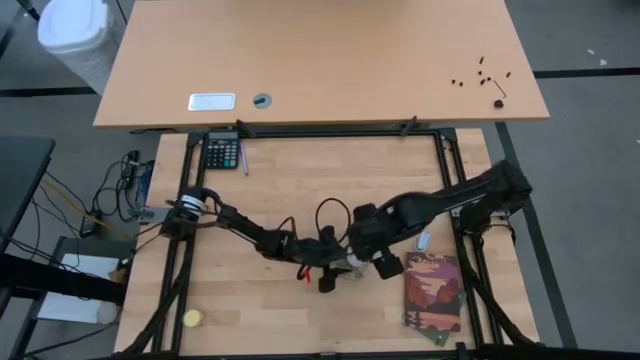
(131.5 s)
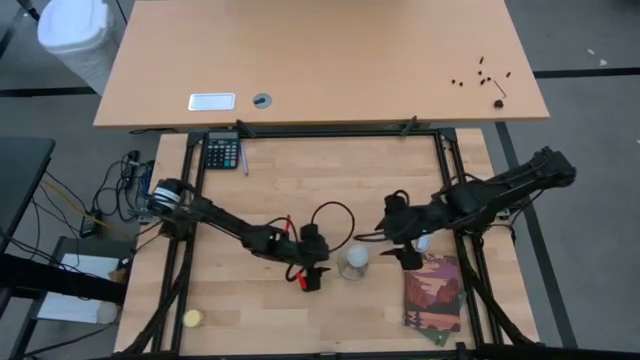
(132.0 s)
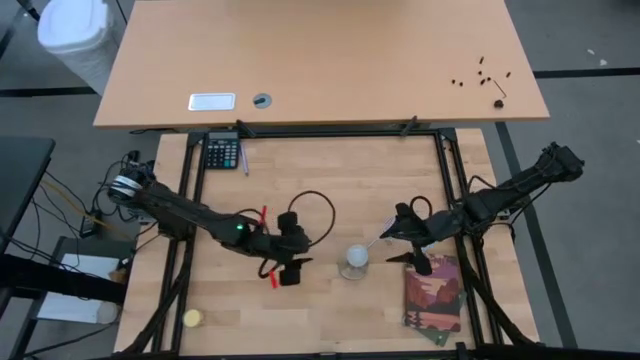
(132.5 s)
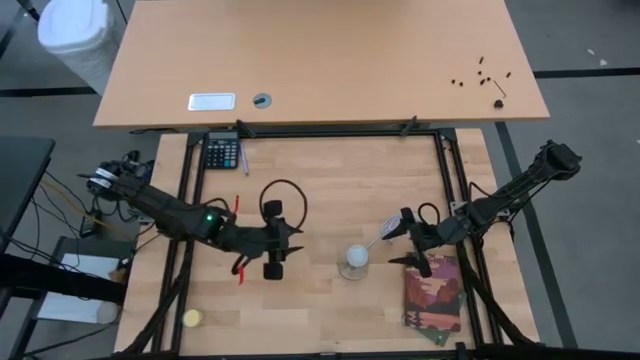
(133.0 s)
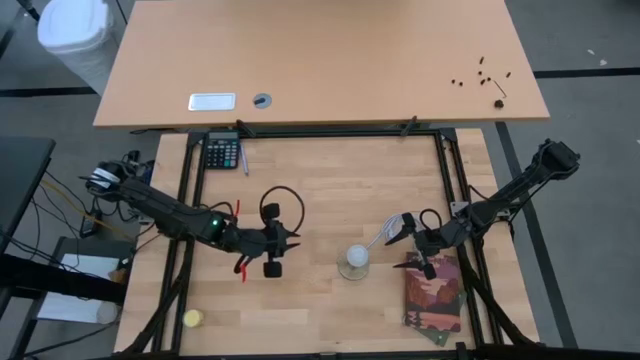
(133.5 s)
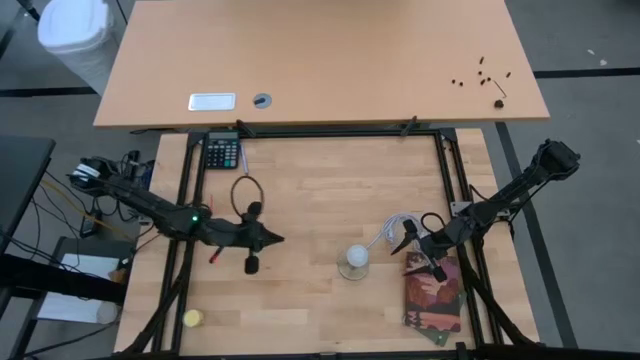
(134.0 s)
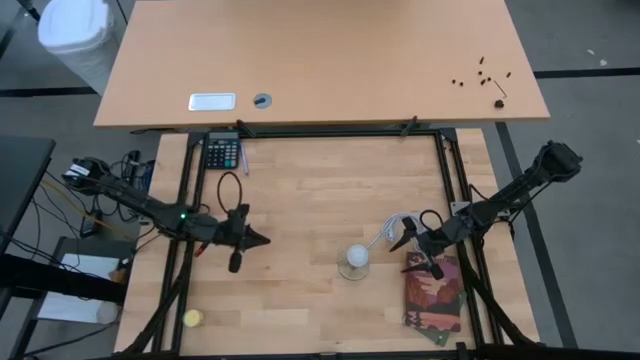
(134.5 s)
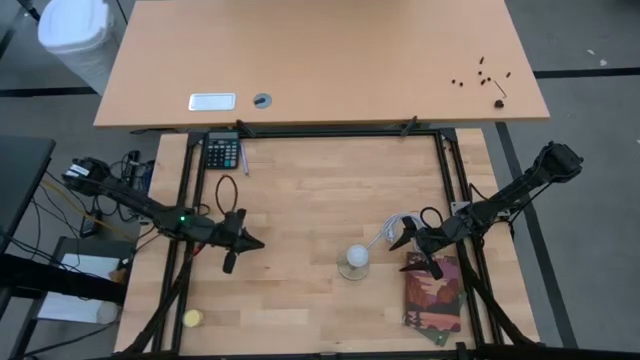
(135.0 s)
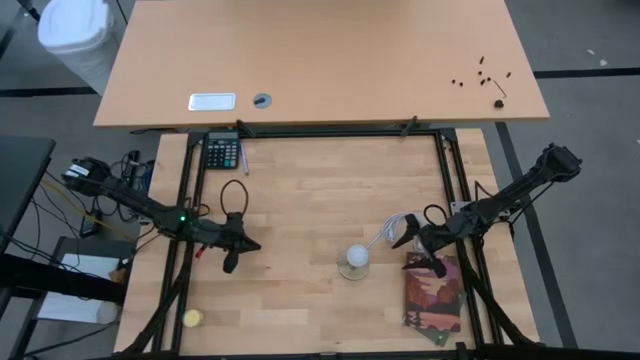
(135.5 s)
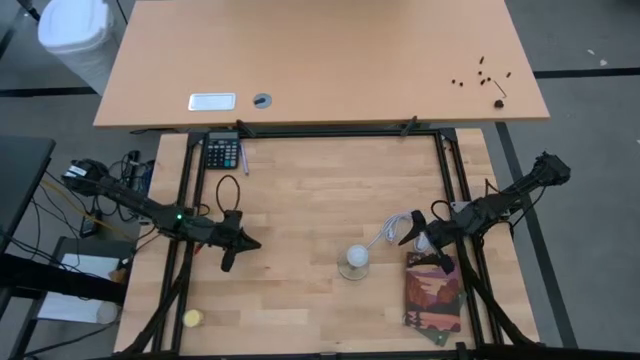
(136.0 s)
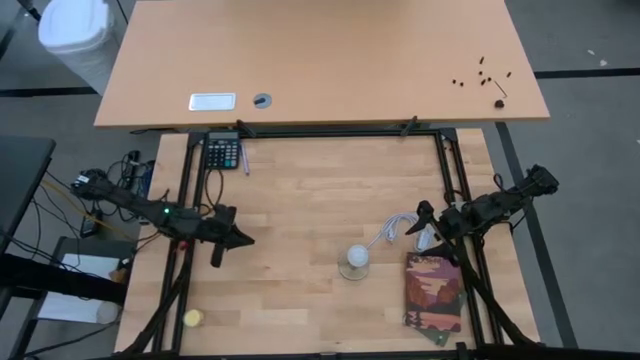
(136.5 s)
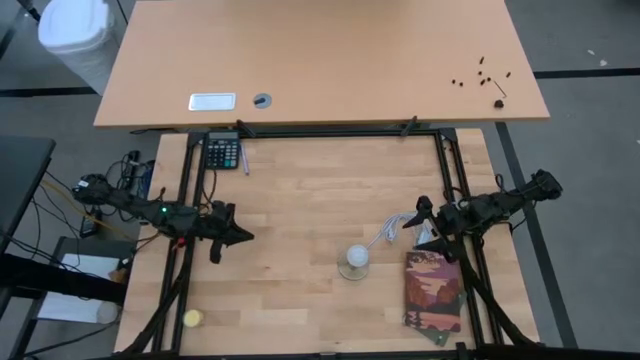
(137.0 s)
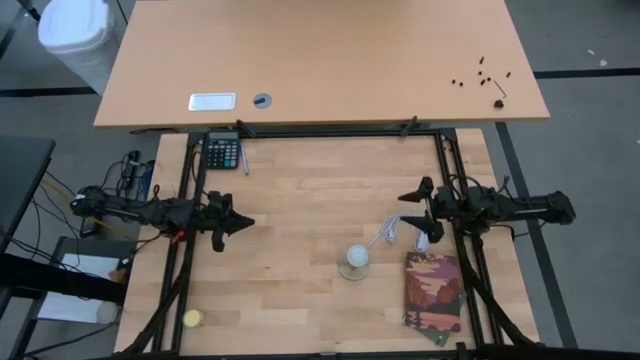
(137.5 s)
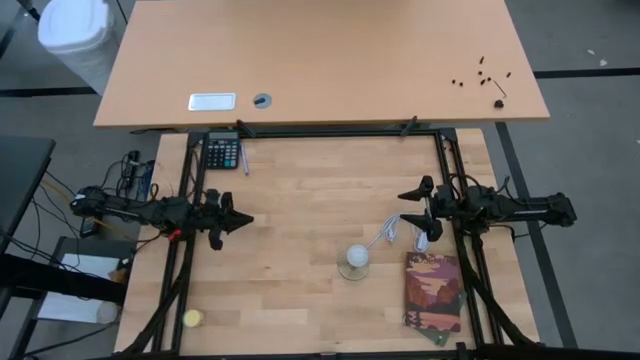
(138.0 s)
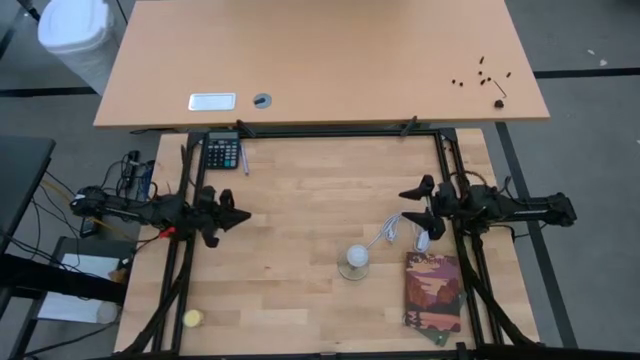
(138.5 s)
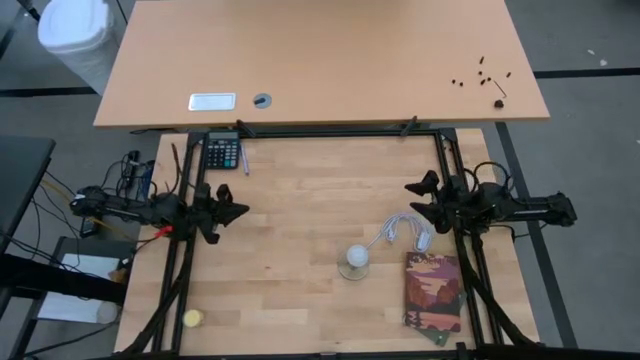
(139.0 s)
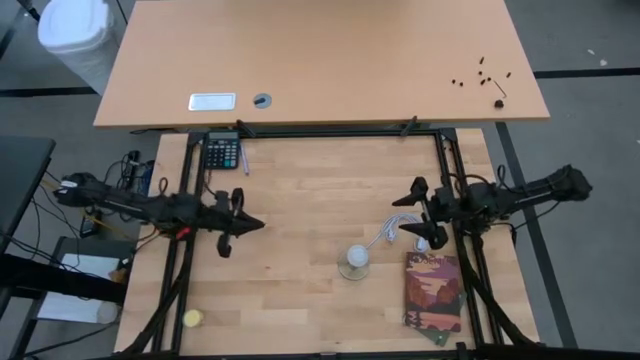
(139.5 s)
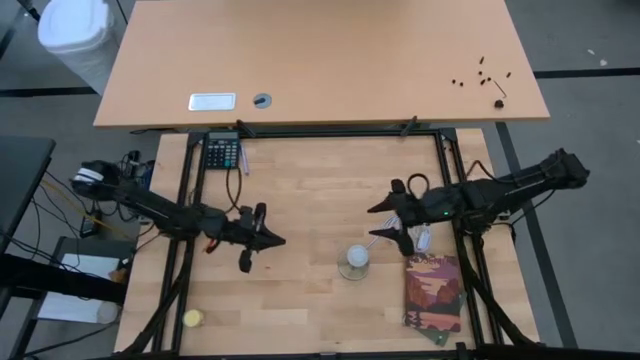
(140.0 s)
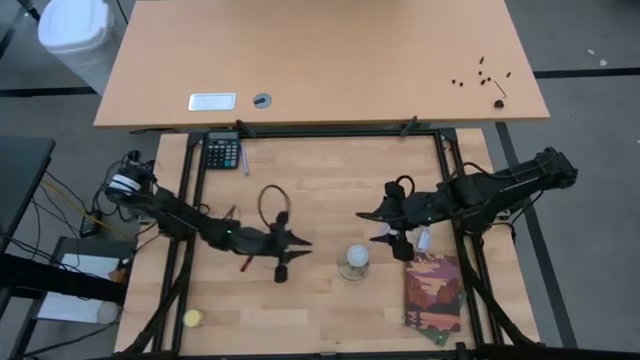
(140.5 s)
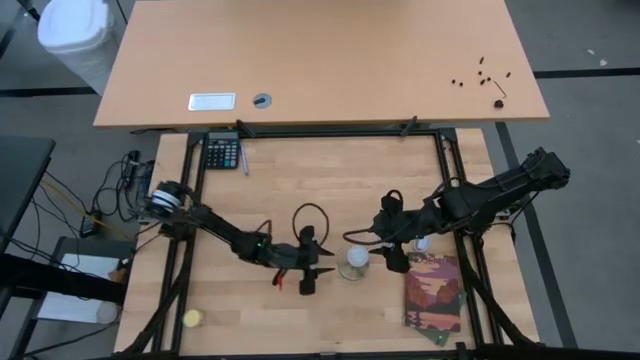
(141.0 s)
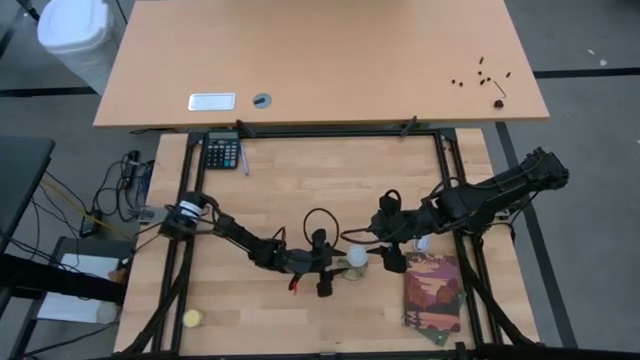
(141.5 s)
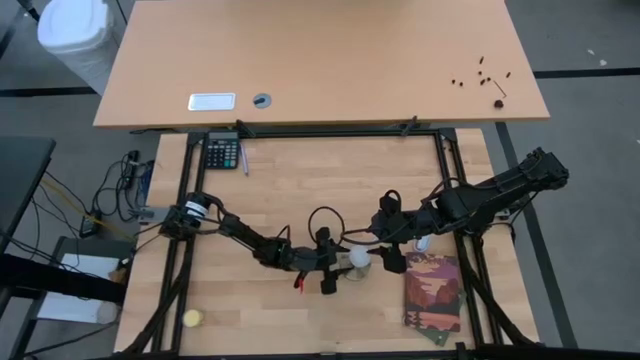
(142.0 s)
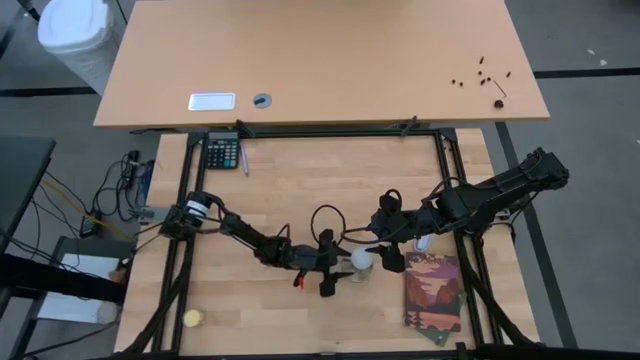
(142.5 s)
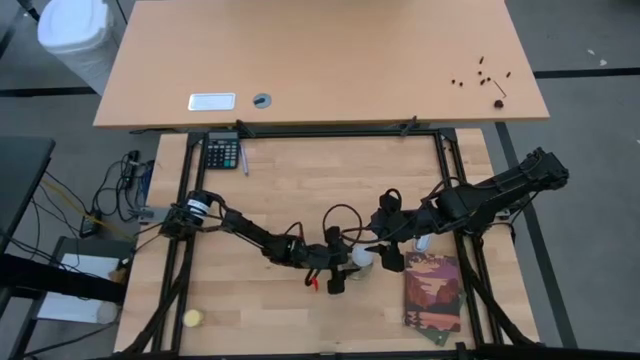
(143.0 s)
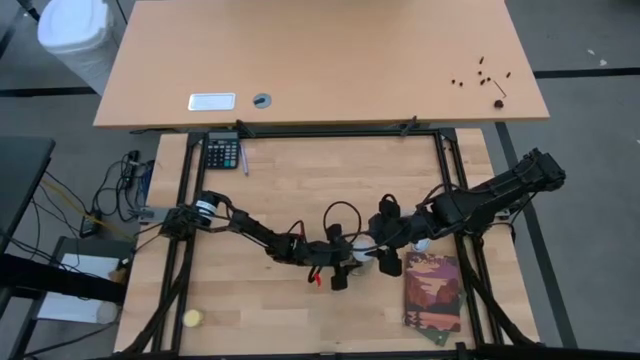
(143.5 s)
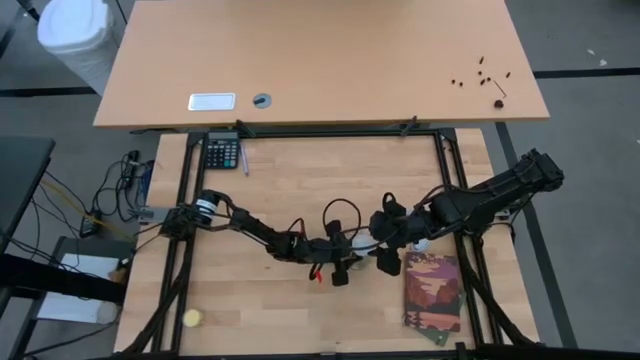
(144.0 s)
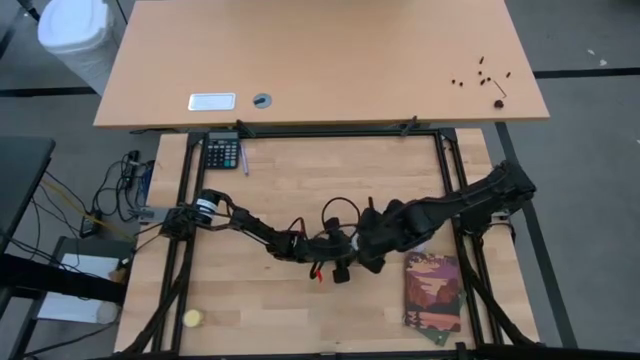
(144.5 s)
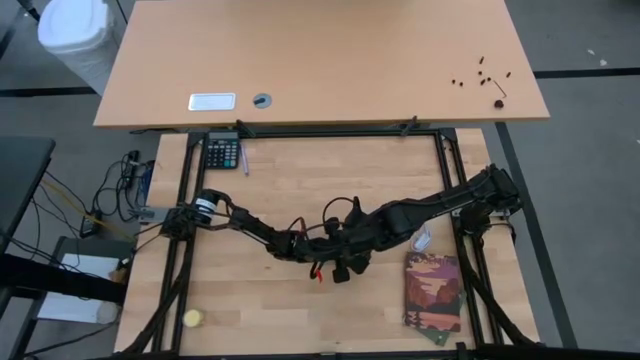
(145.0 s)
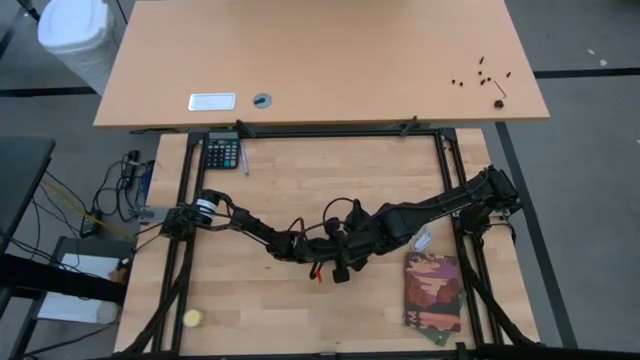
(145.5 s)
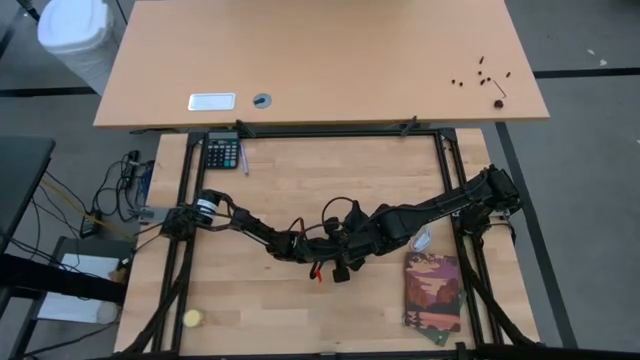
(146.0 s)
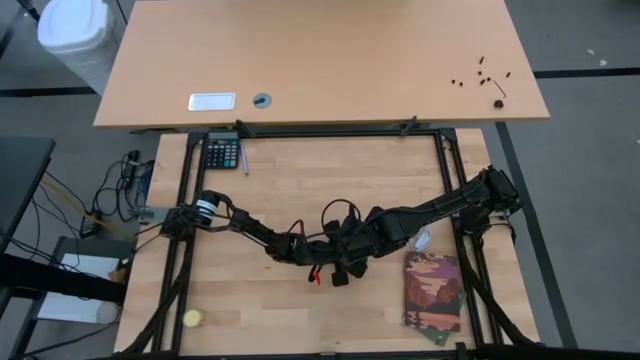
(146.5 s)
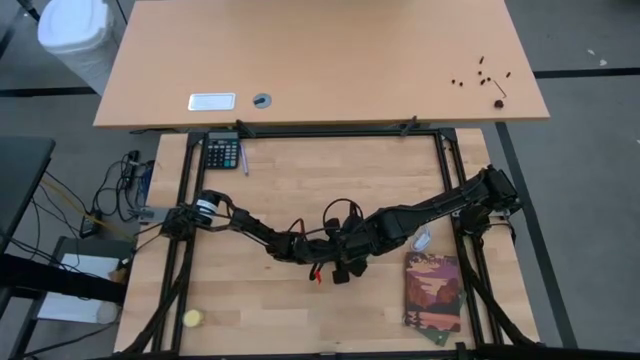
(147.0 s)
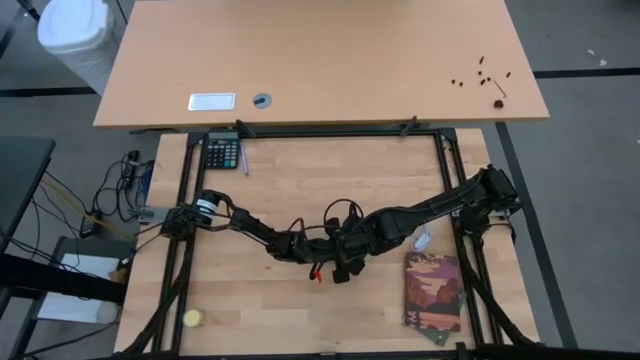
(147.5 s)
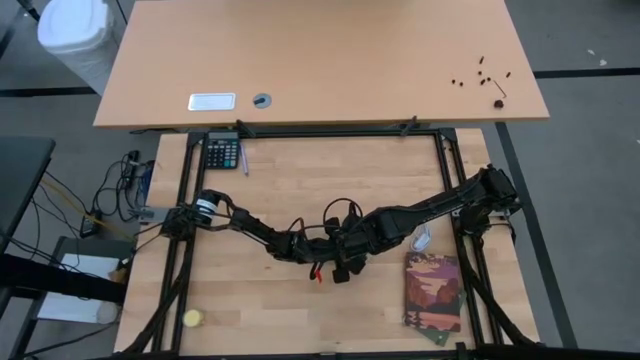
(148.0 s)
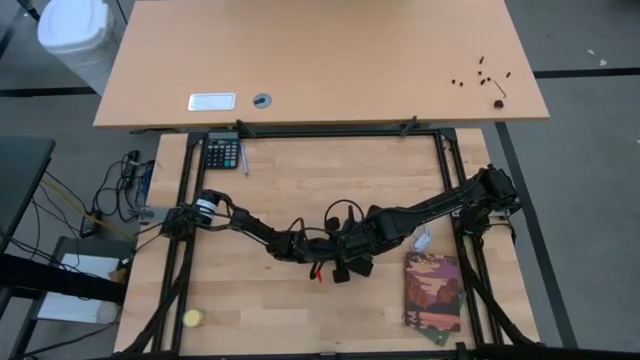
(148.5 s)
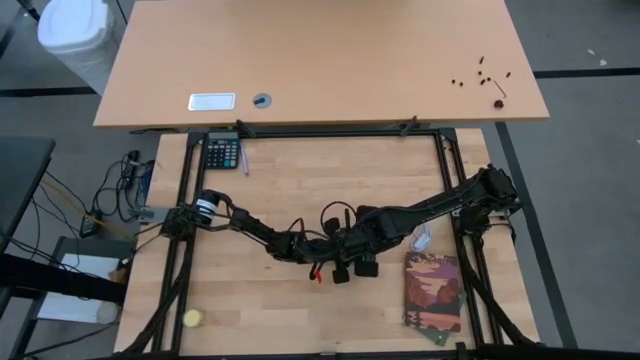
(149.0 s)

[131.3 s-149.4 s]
Task: Screw lightbulb
Remove the lightbulb from the lamp socket

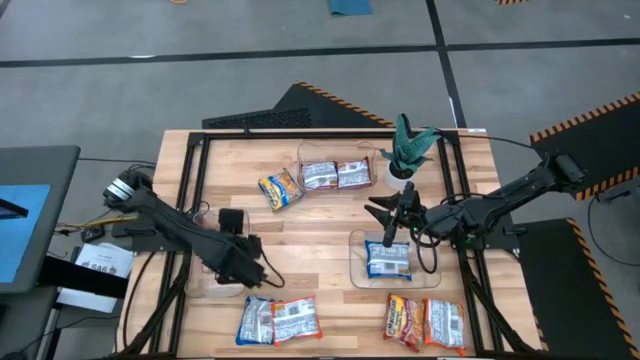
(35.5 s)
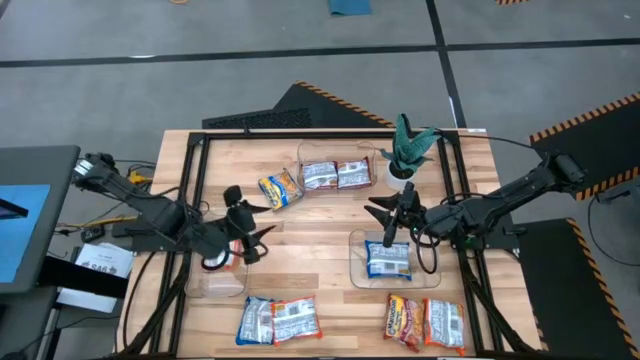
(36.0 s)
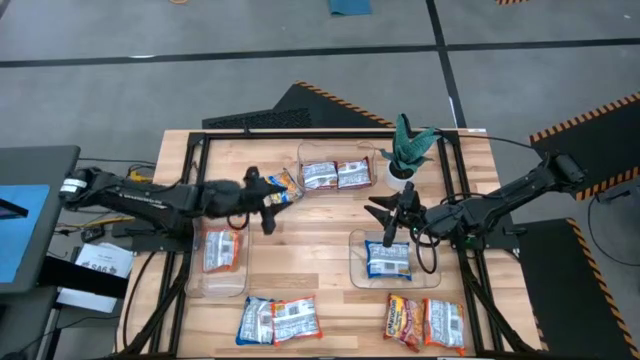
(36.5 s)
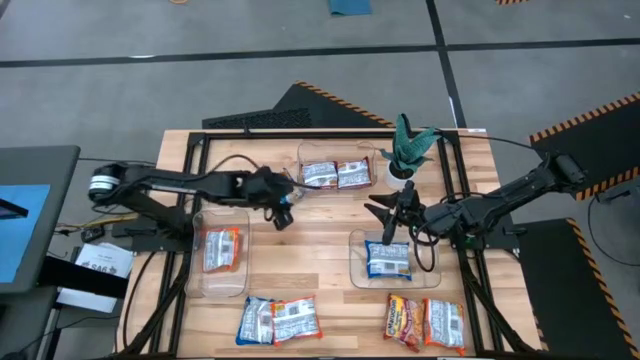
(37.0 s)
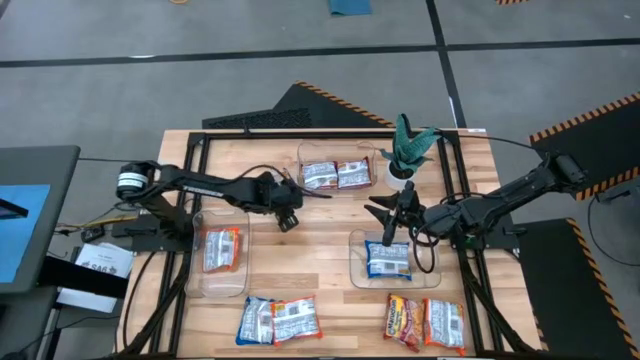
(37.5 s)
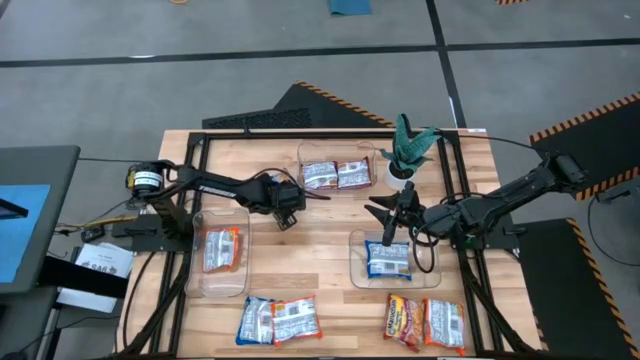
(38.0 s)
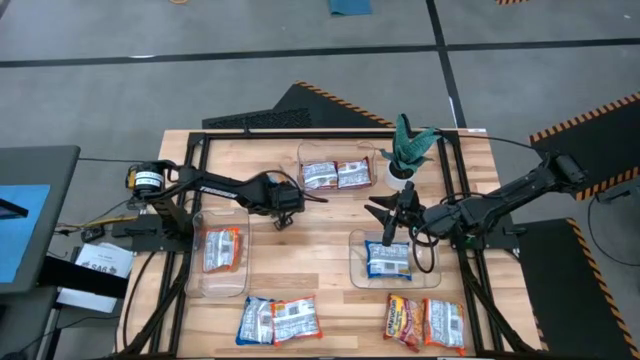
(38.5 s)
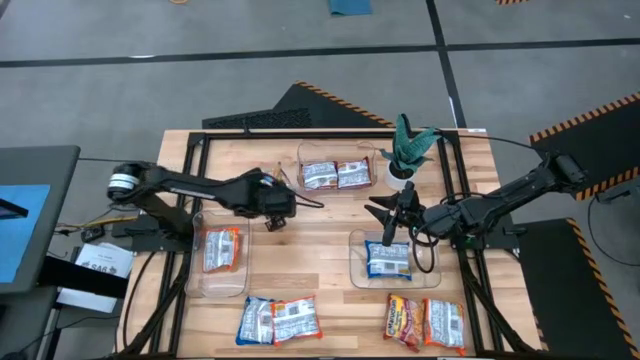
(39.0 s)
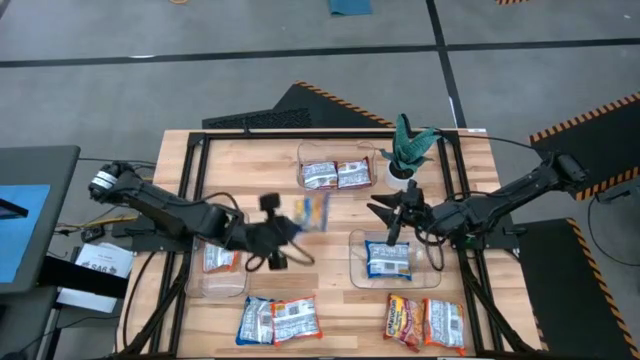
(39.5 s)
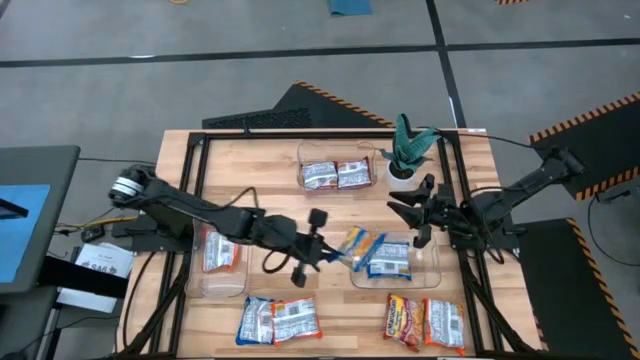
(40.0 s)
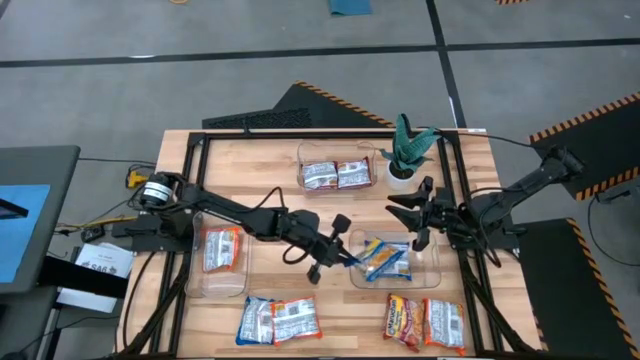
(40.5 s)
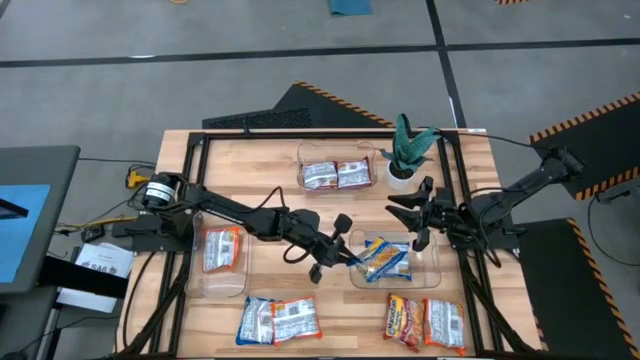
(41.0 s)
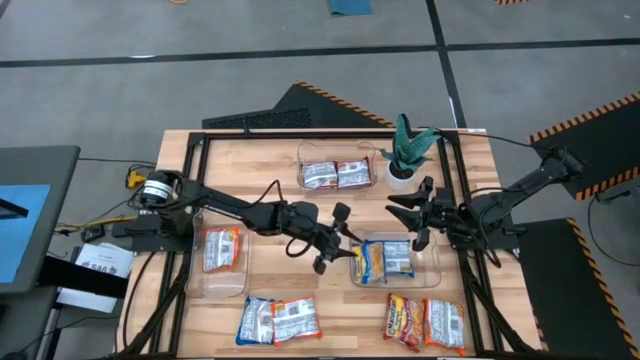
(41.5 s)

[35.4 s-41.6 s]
Task: Sort Maruchan noodles
Put the top blue bag into the bottom right transparent bin
